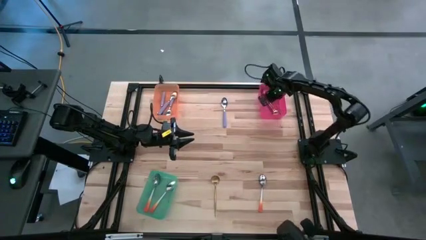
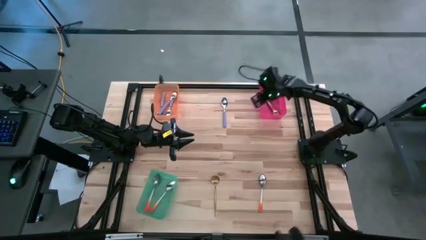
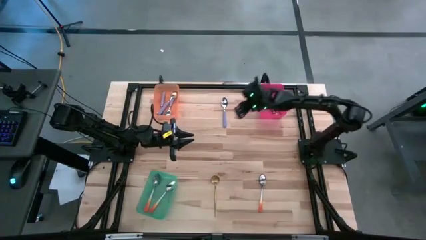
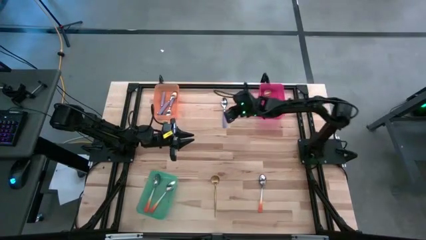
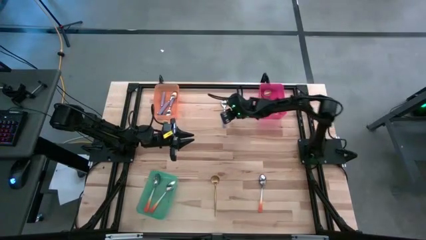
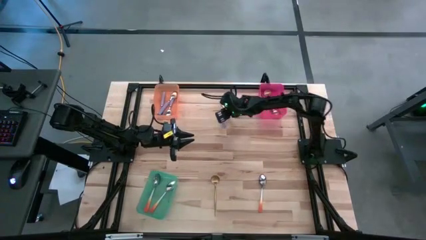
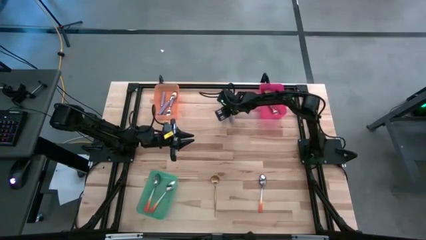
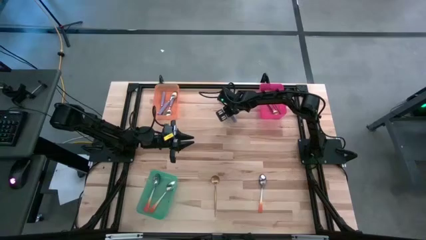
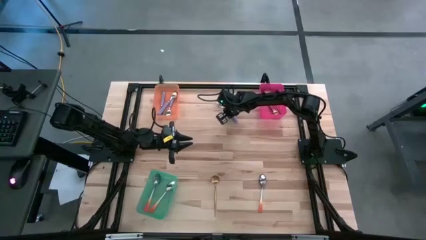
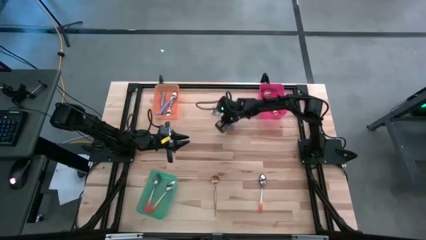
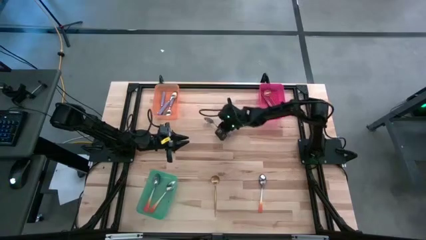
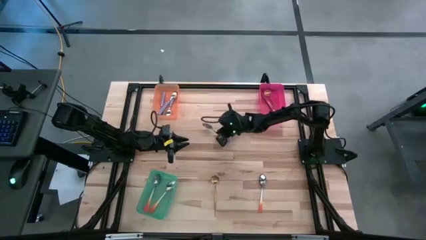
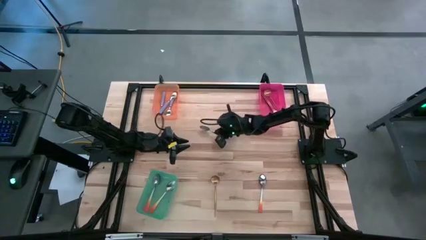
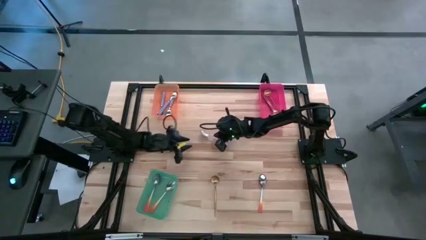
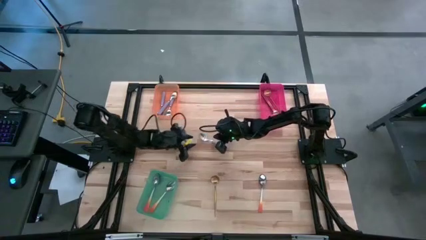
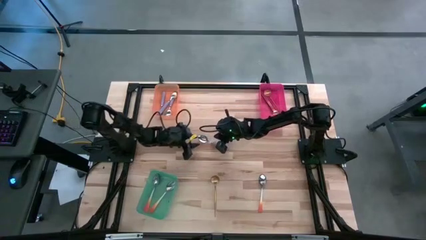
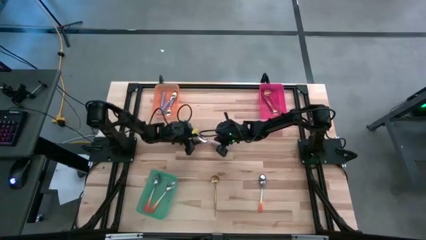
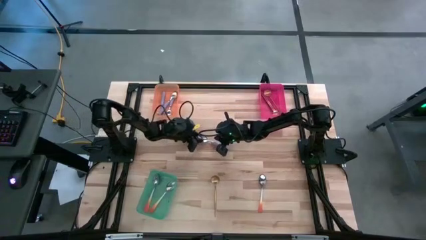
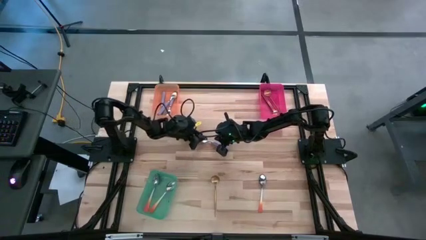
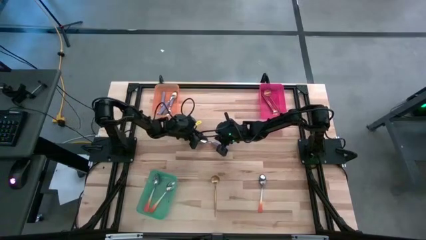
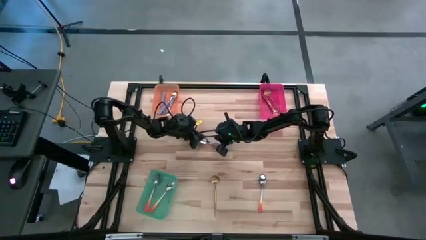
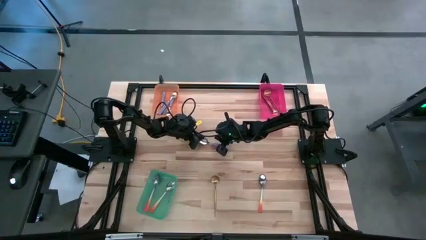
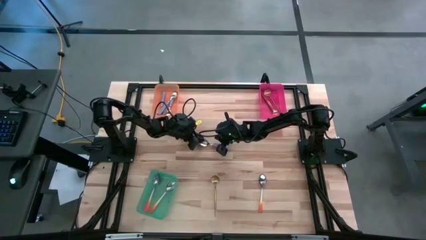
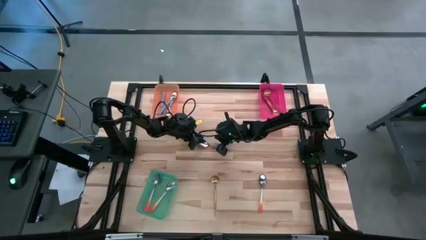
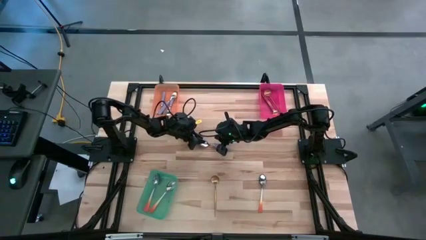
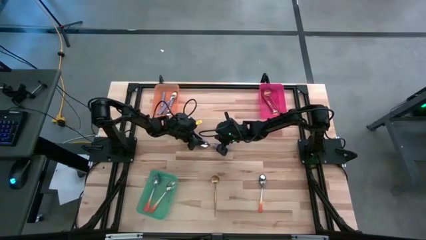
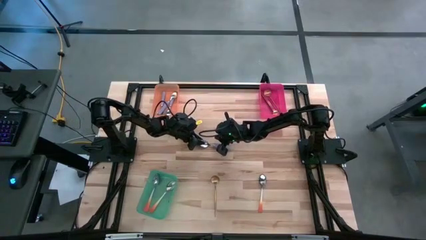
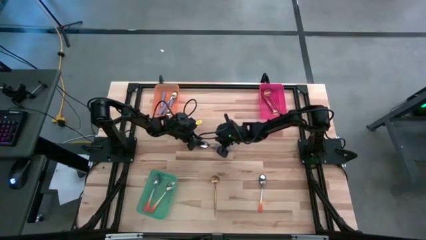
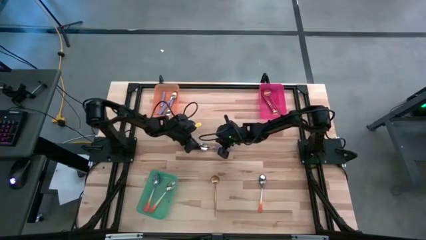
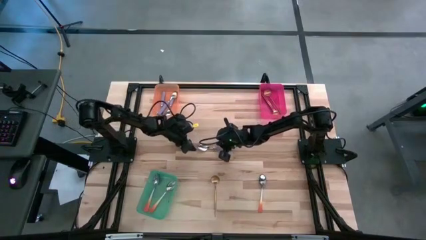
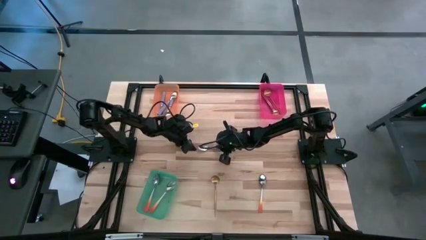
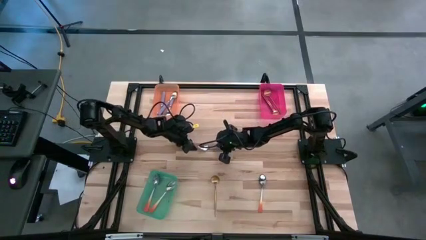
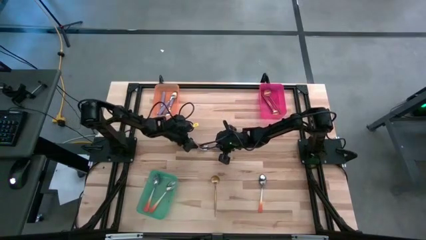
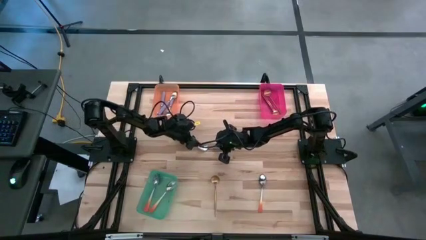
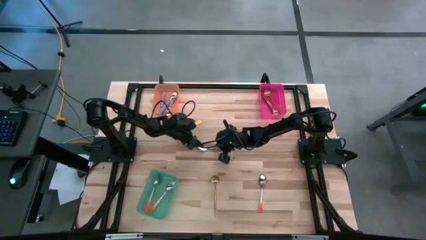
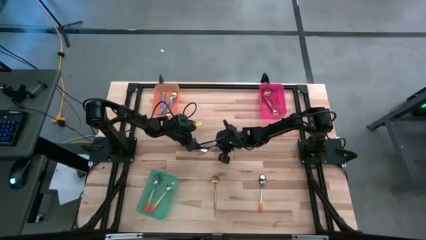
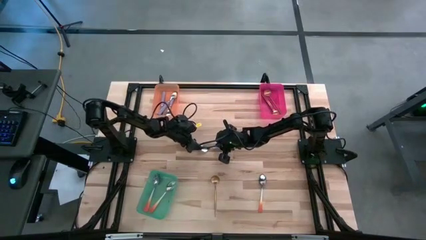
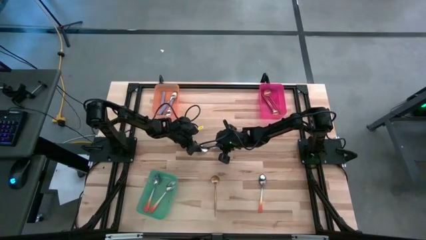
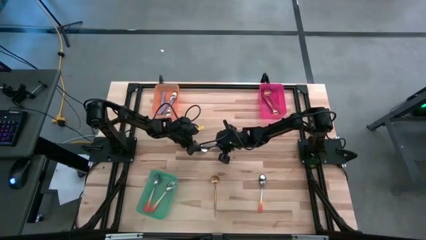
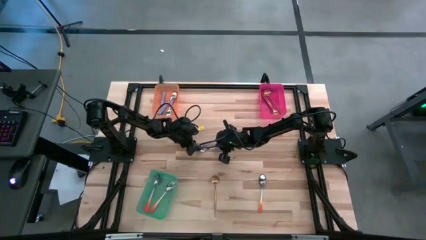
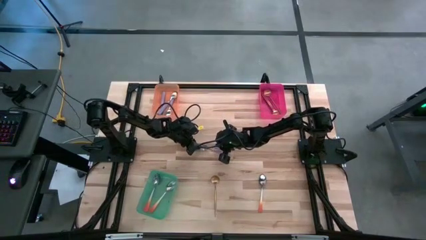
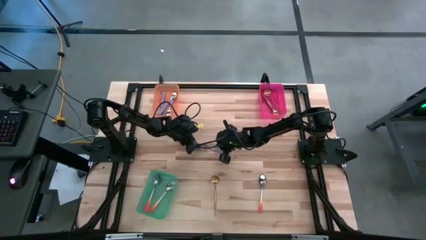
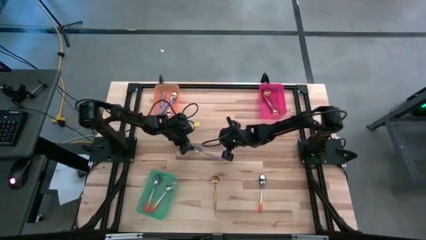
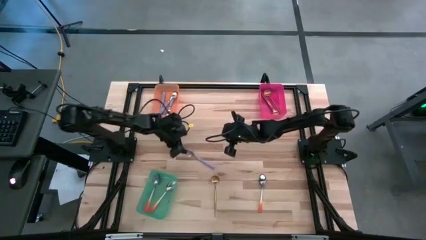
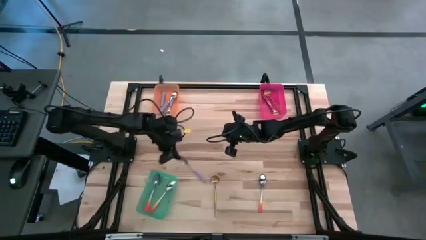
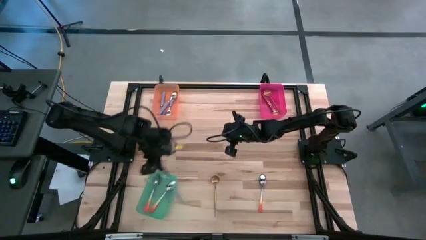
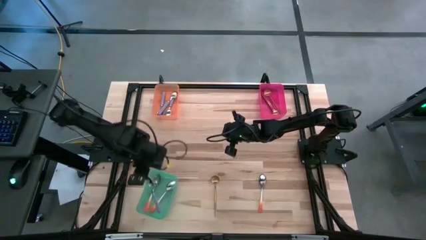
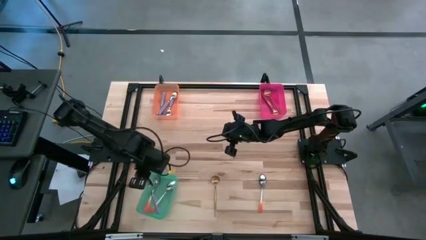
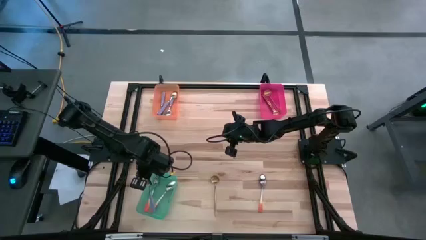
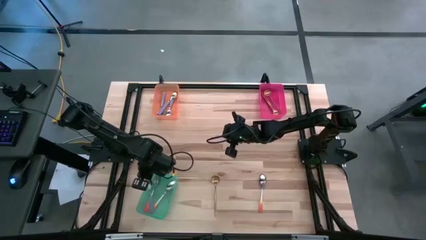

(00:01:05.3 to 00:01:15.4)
Task: Sort silverware by color (type)
Put the purple spoon into the orange bin

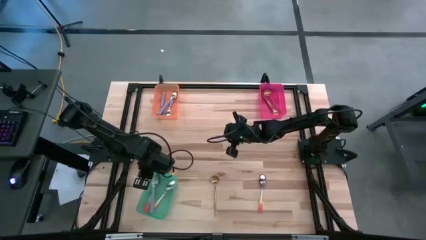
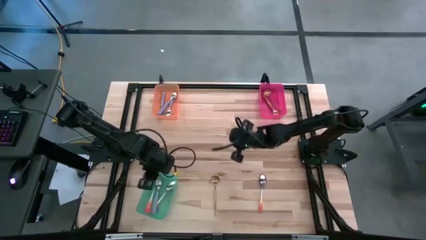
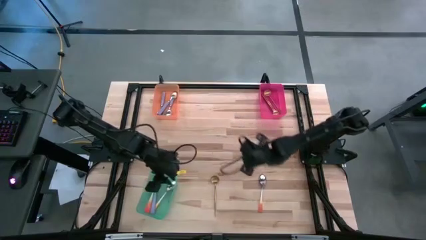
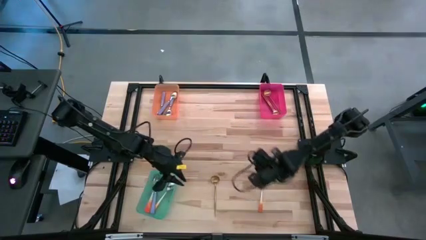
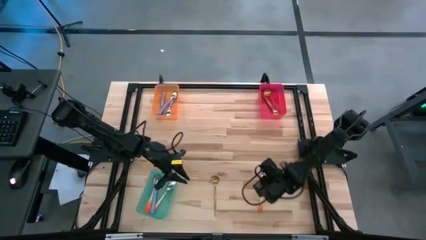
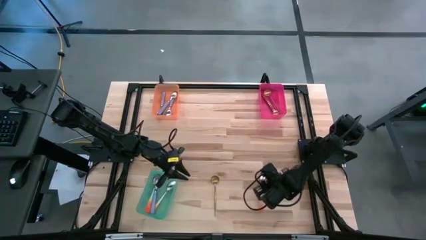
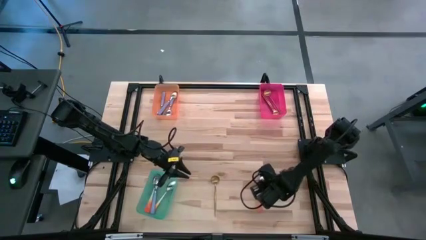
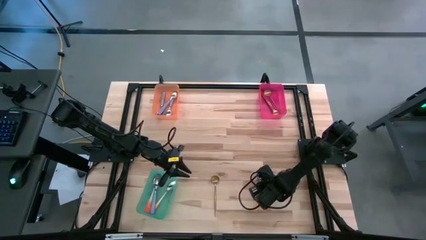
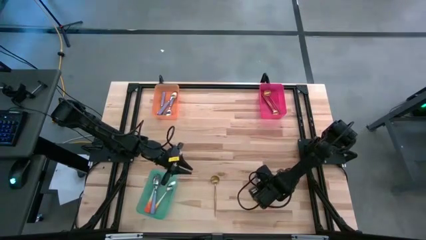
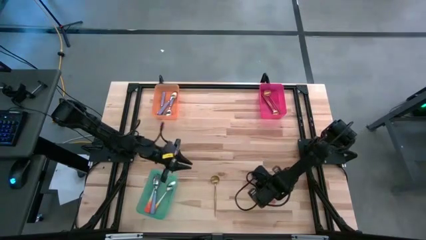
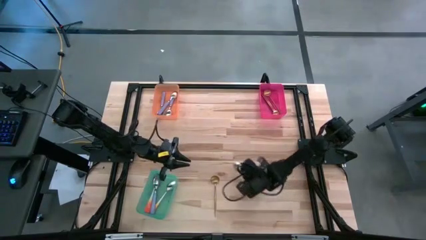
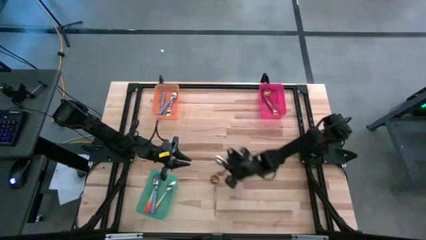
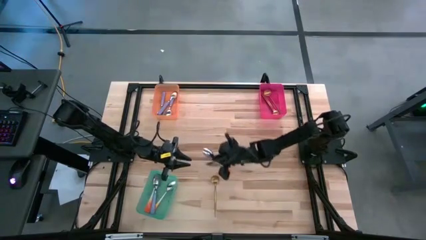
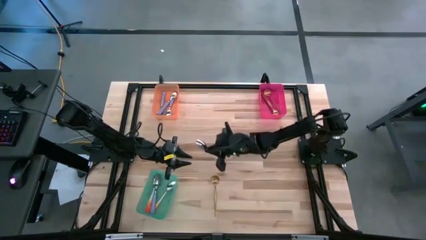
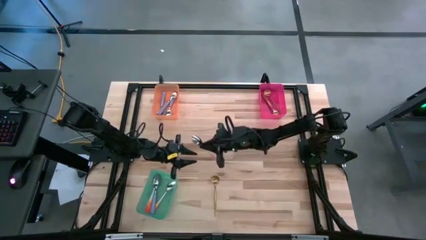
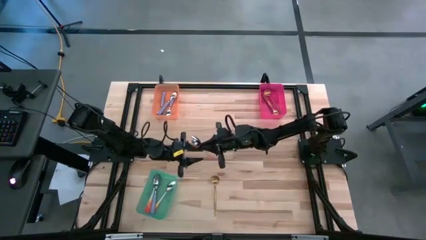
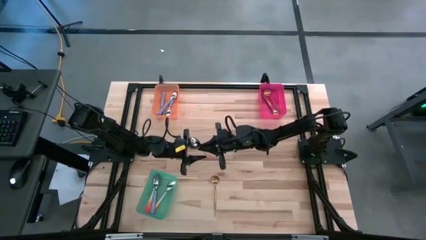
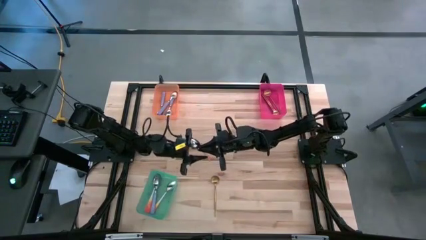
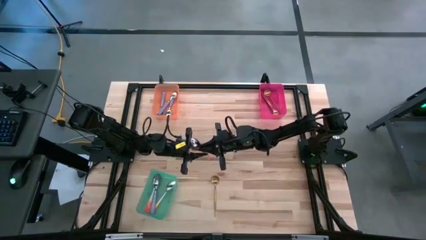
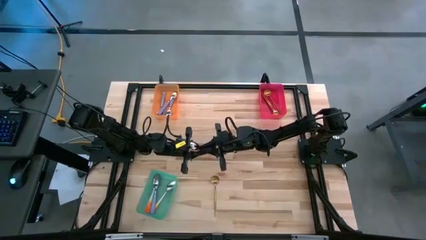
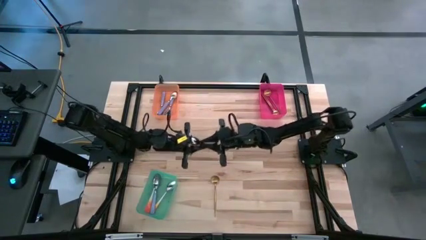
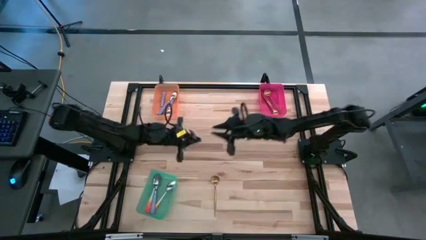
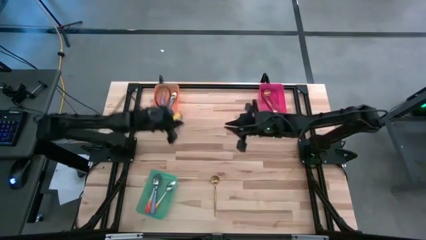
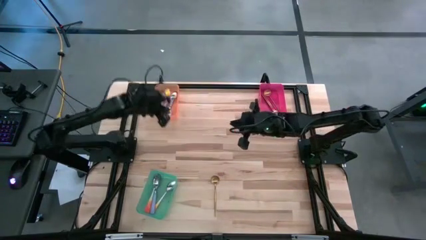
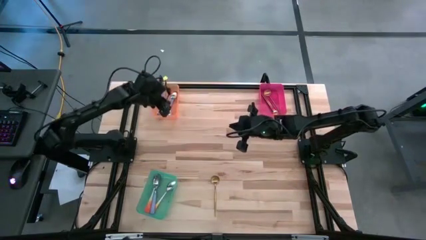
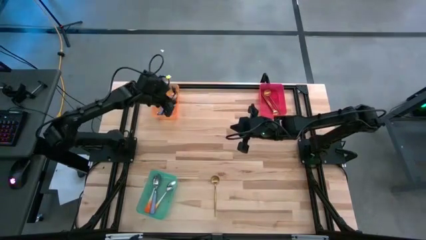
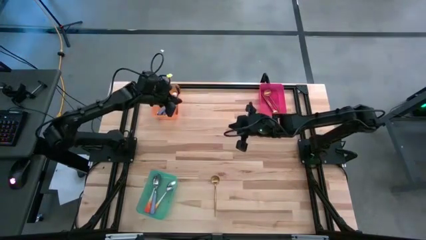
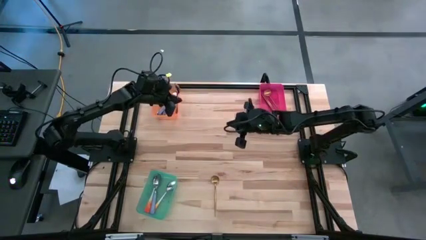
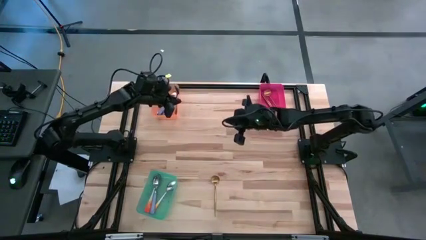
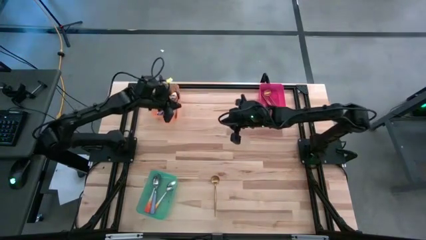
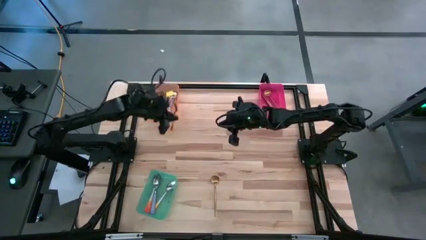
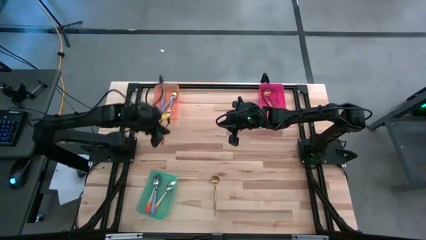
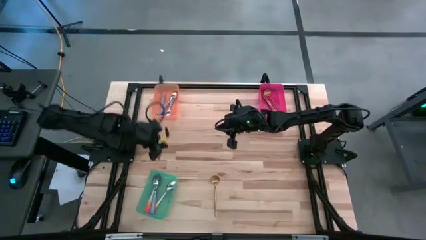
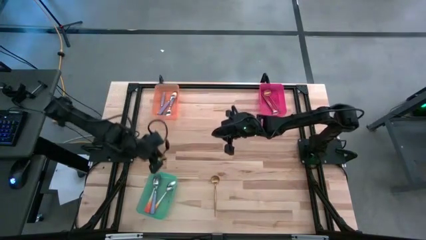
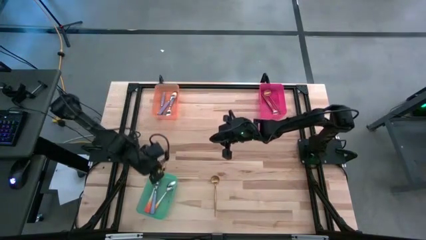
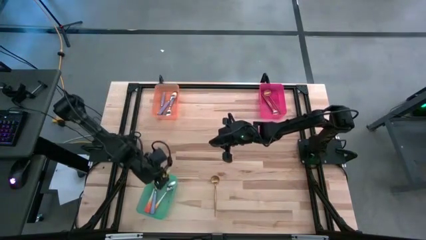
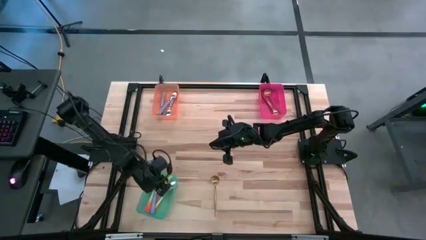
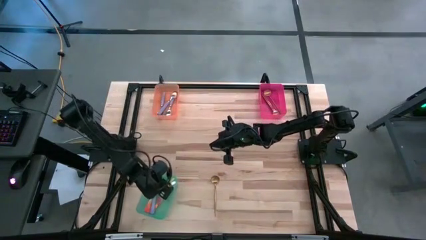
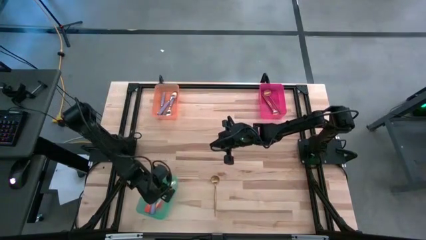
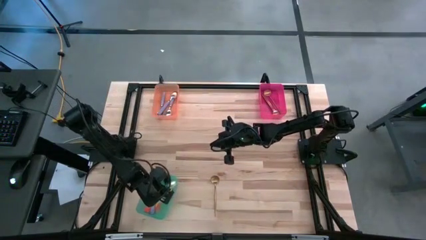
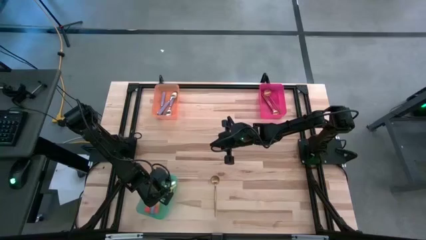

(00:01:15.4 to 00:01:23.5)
Put the orange spoon into the green bin
